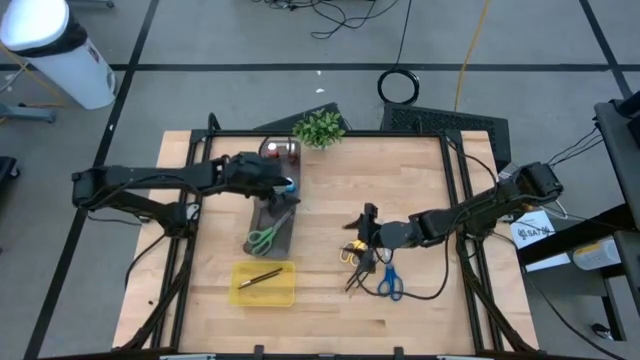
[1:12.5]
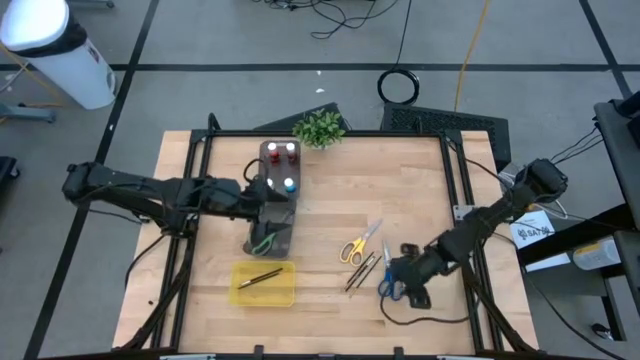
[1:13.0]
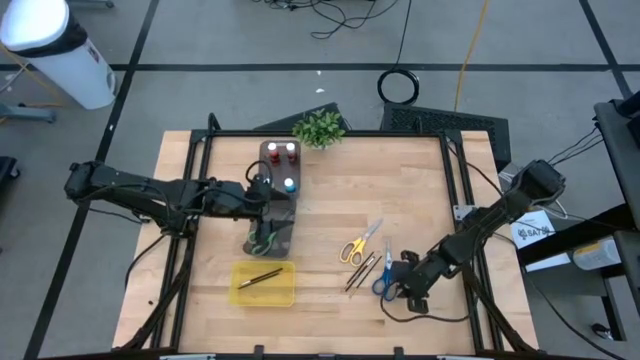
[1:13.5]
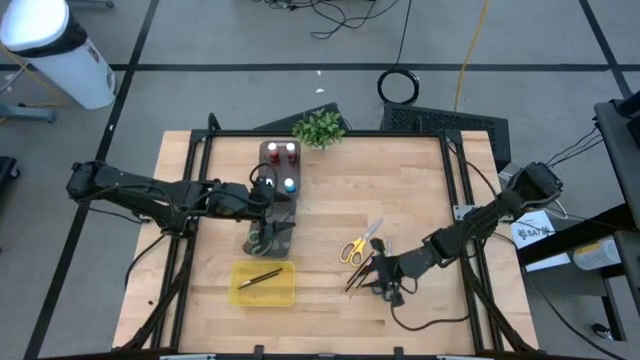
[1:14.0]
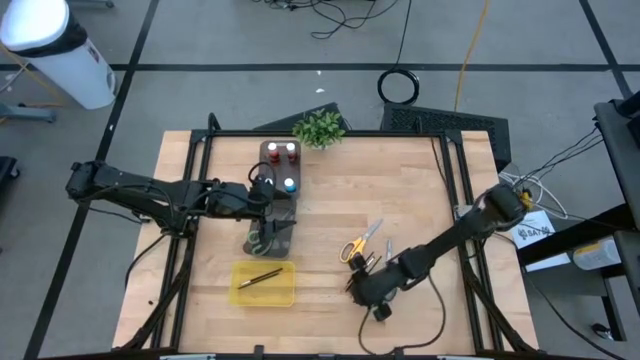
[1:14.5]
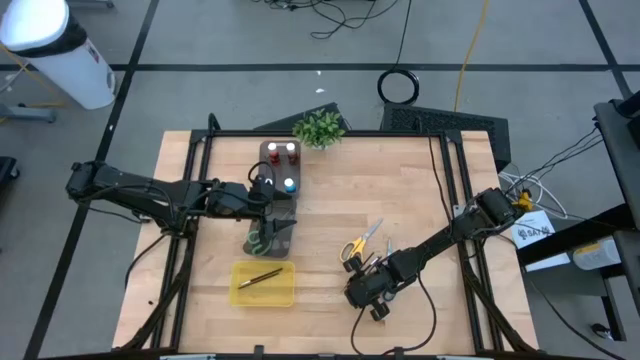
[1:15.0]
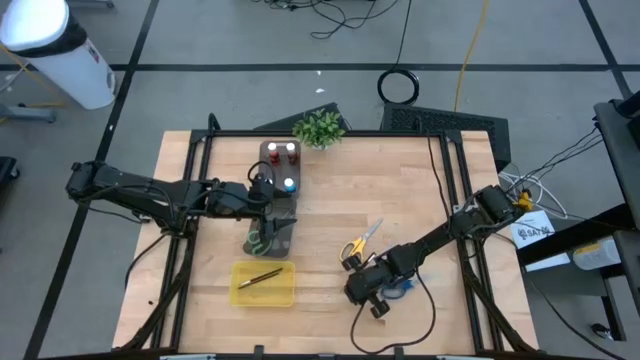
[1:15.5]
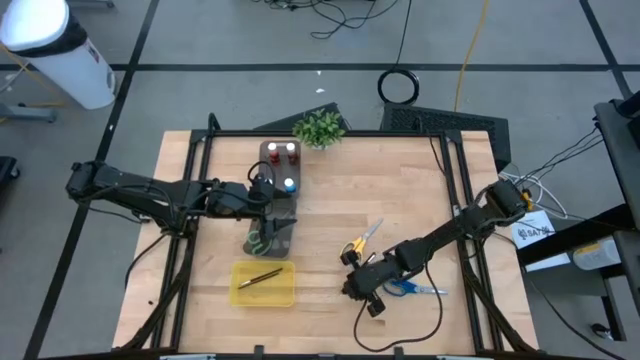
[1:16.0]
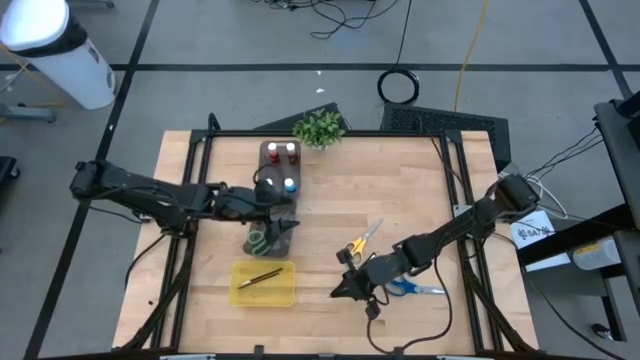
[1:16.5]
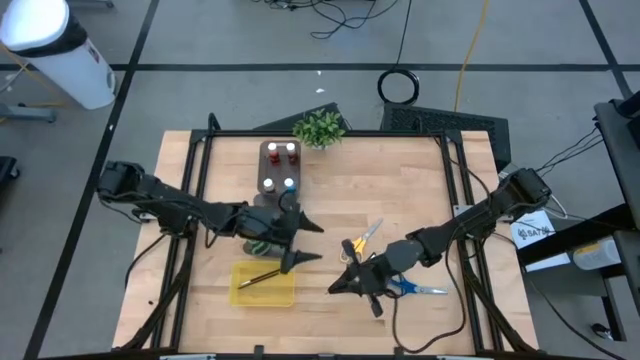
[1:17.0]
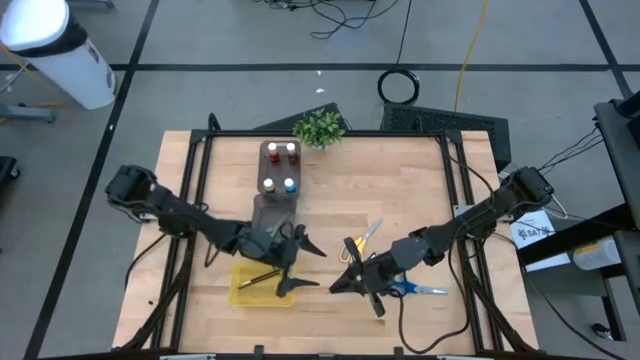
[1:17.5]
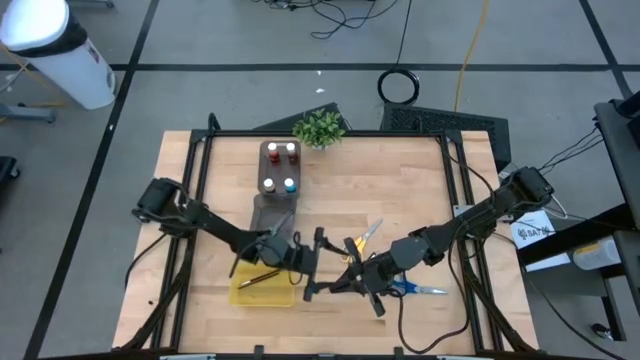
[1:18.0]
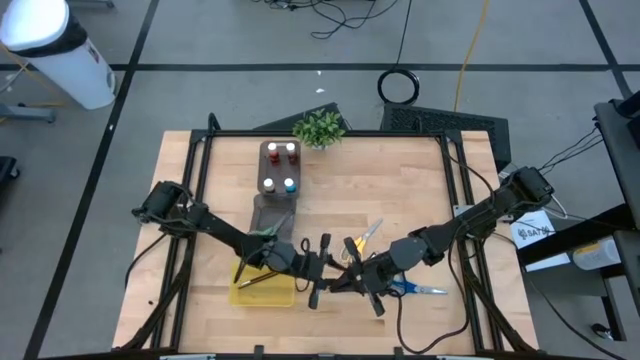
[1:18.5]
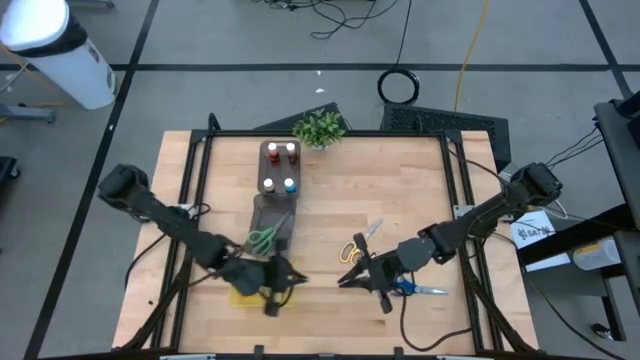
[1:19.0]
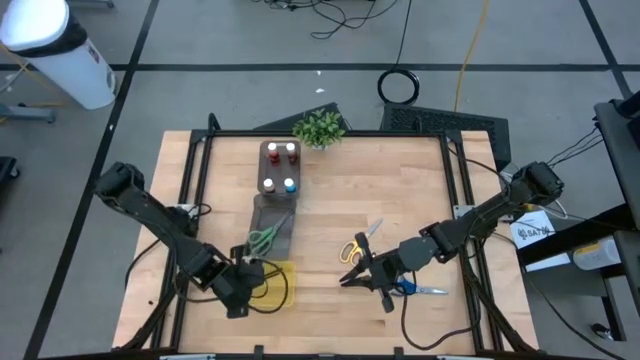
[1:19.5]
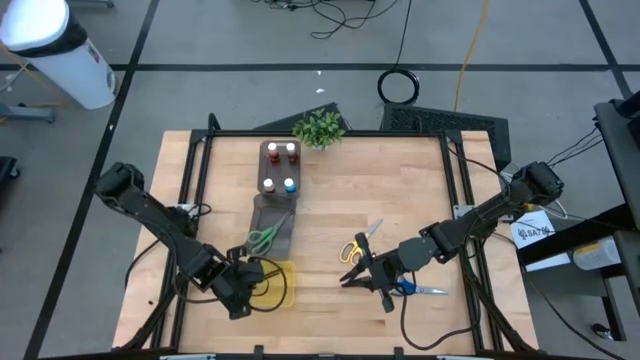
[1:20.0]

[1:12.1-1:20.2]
Task: Pick & Place Paint Supplies
Put the gold paint brush into the yellow bin

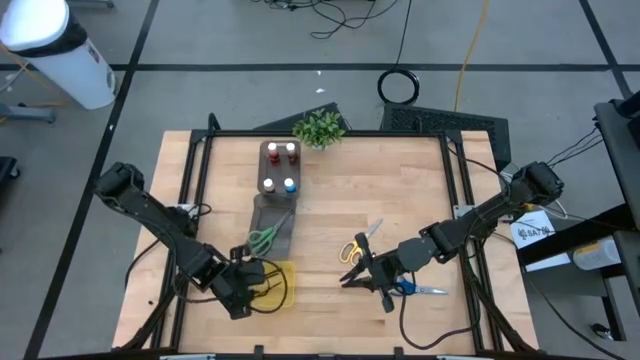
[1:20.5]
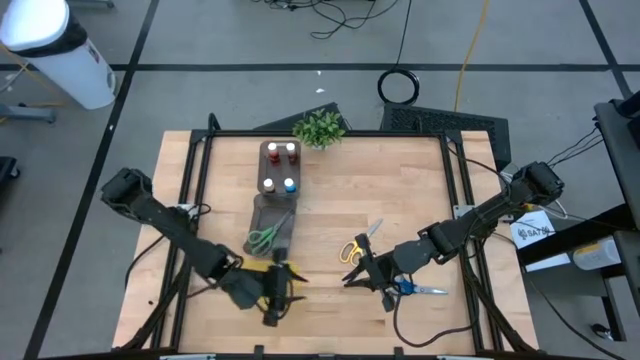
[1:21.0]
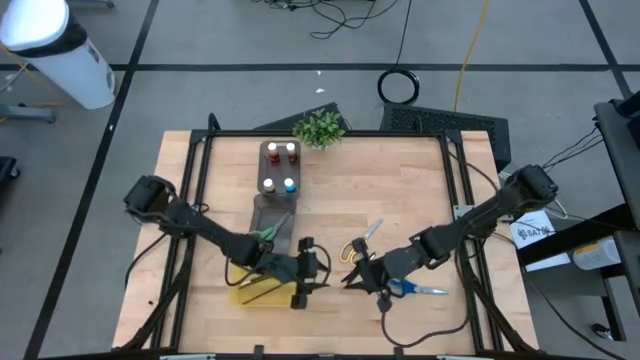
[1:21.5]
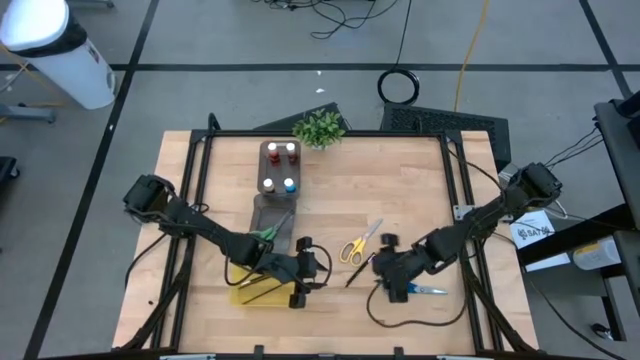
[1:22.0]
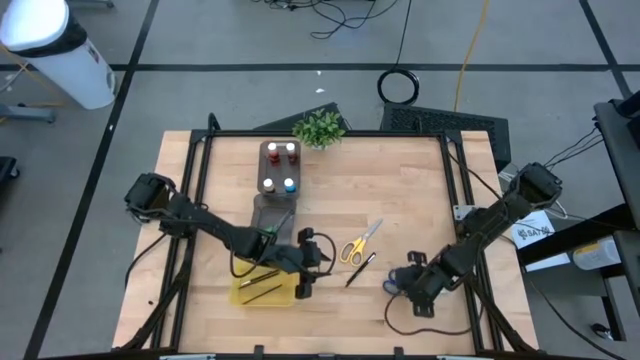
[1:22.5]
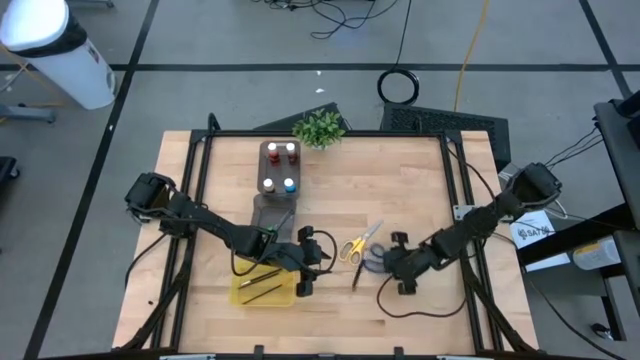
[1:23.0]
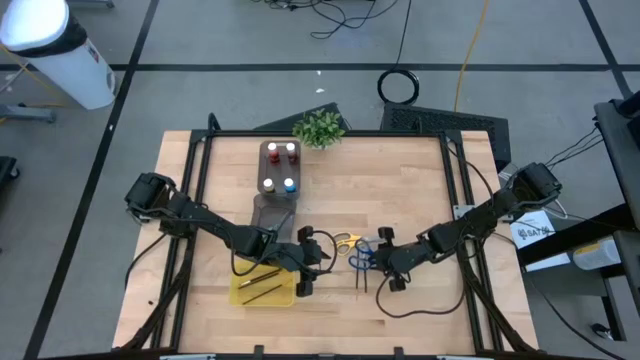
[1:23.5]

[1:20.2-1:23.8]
Put the blue scissors into the bottom black bin

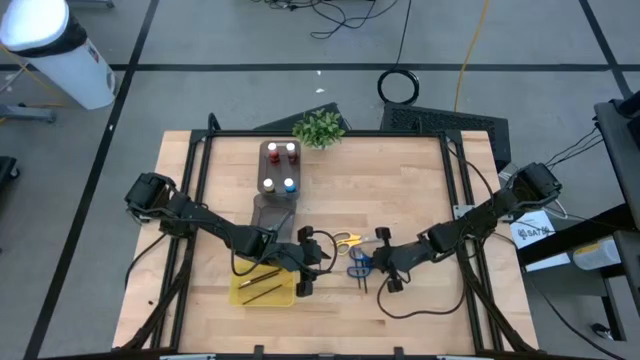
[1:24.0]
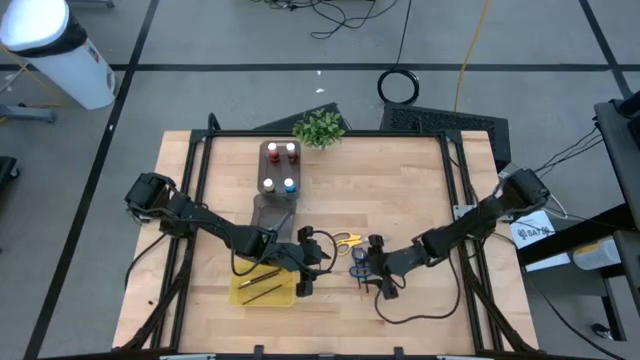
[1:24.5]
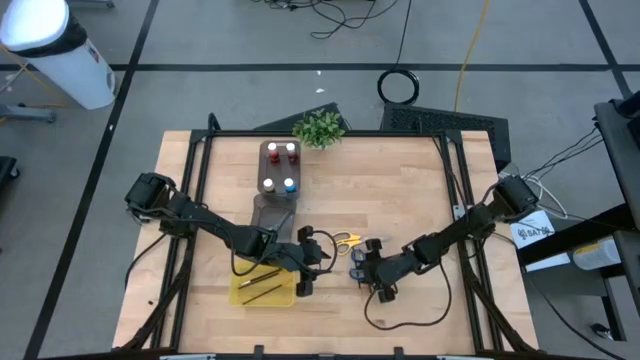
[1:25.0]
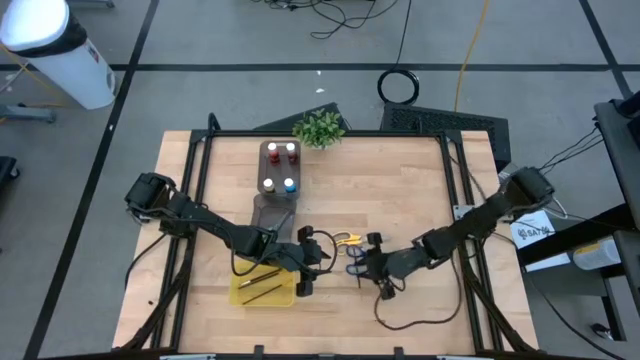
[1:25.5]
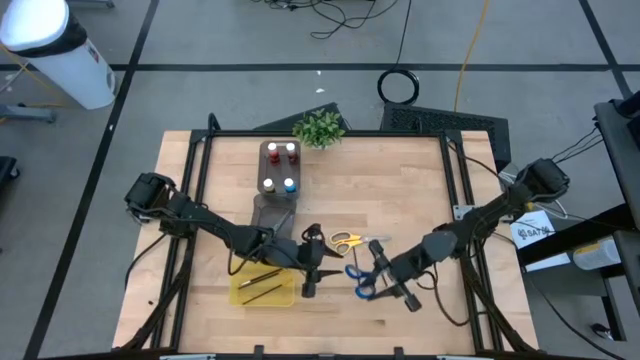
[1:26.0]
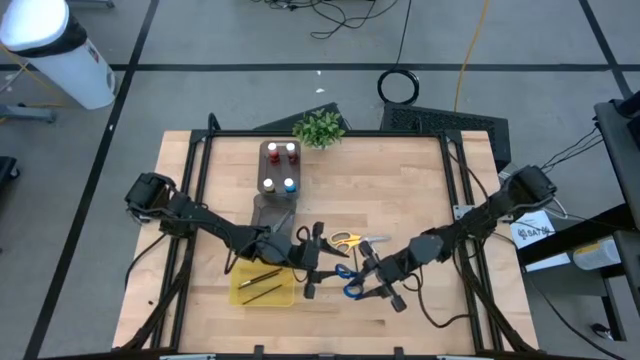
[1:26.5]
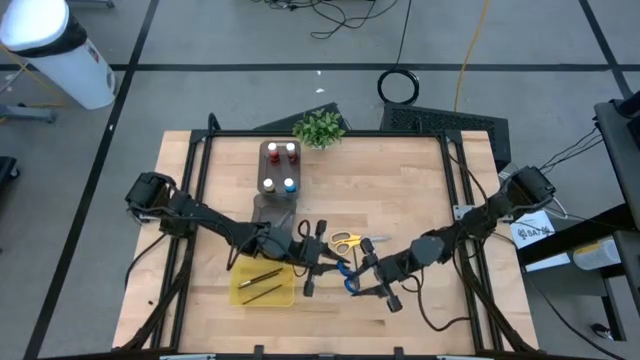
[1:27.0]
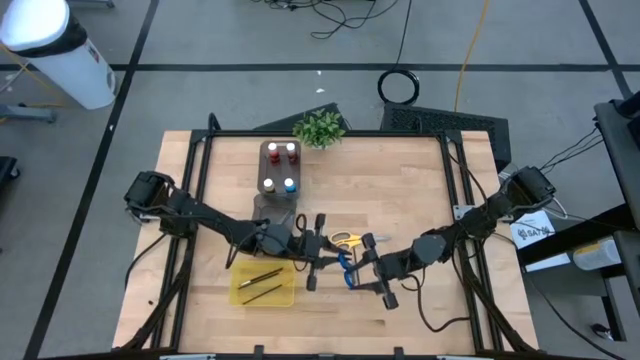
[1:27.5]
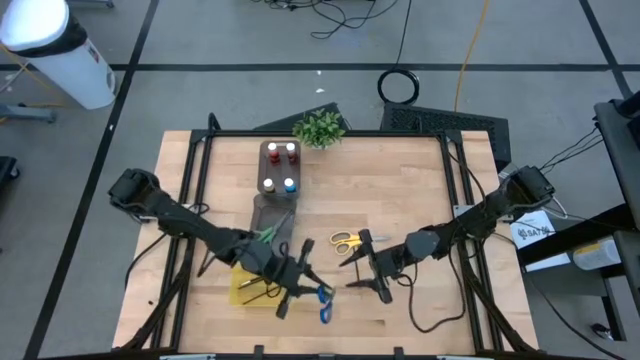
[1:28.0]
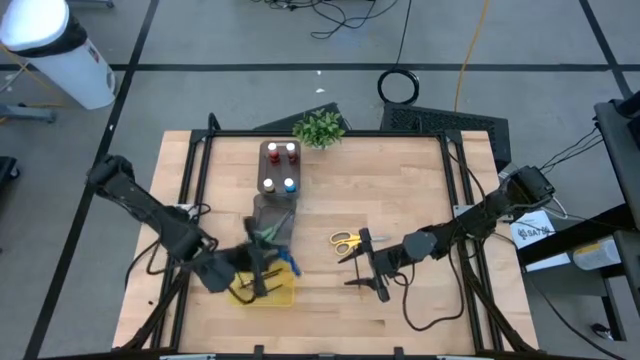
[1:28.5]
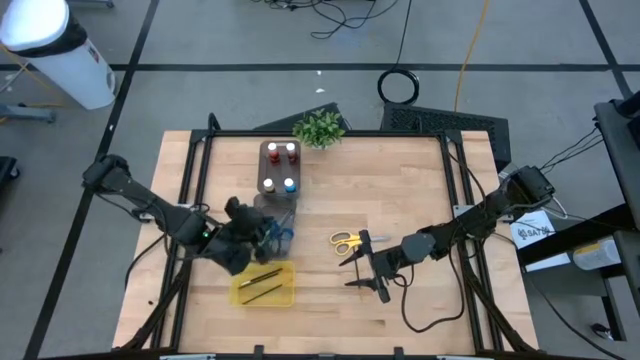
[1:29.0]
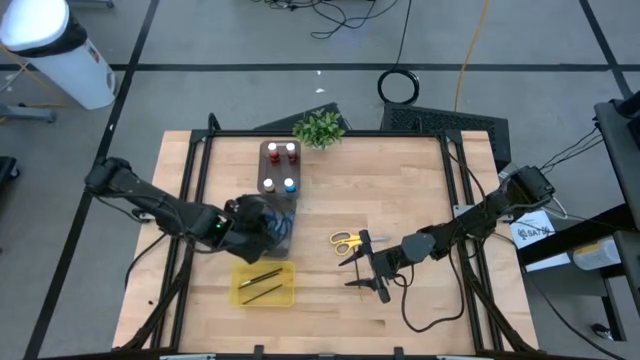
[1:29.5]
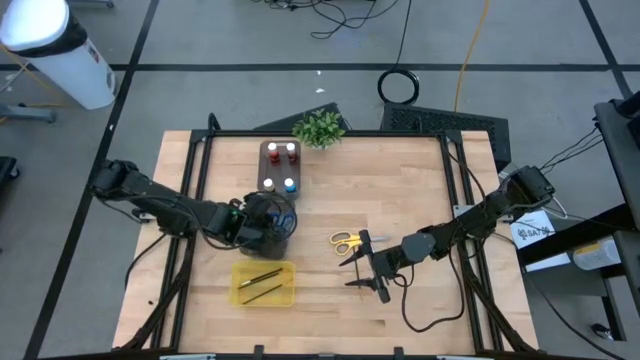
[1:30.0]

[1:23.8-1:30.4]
Put the blue scissors into the bottom black bin

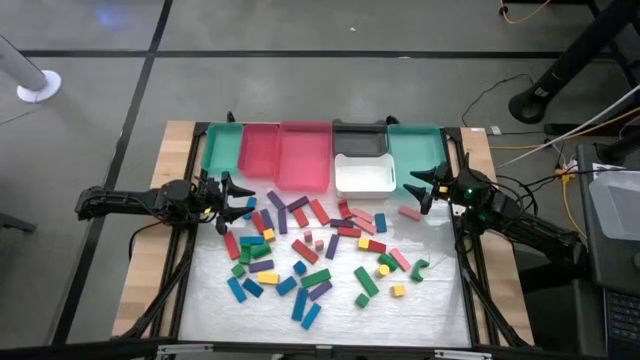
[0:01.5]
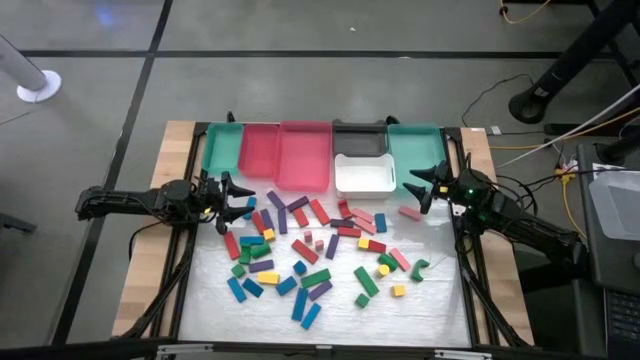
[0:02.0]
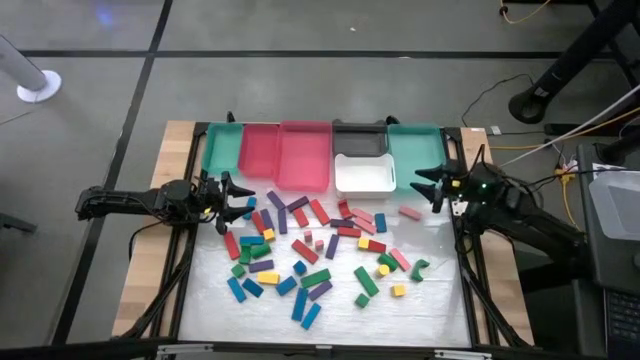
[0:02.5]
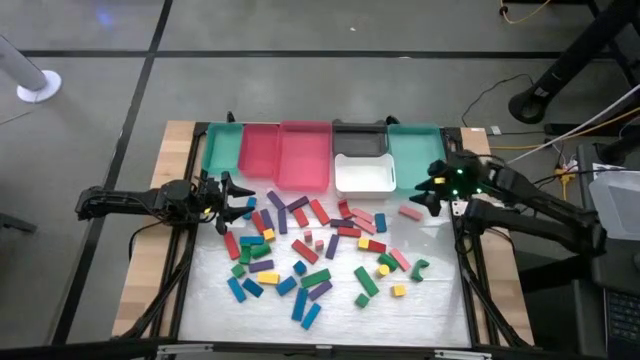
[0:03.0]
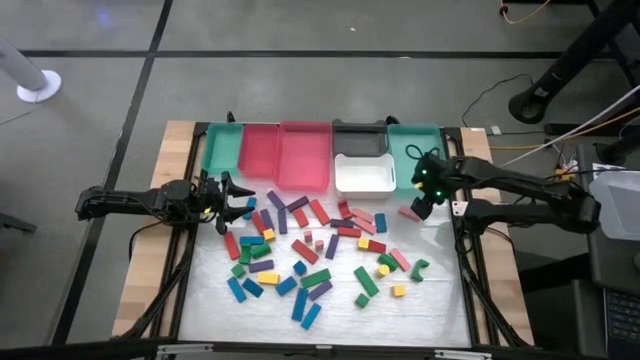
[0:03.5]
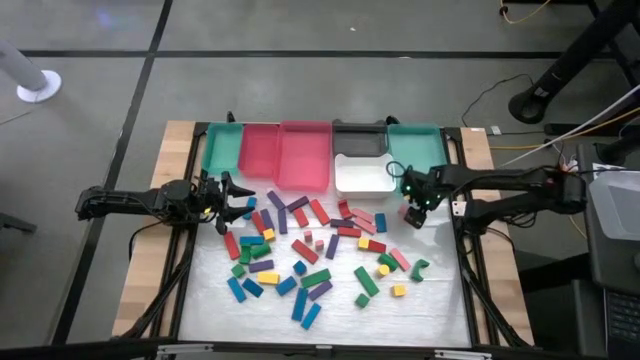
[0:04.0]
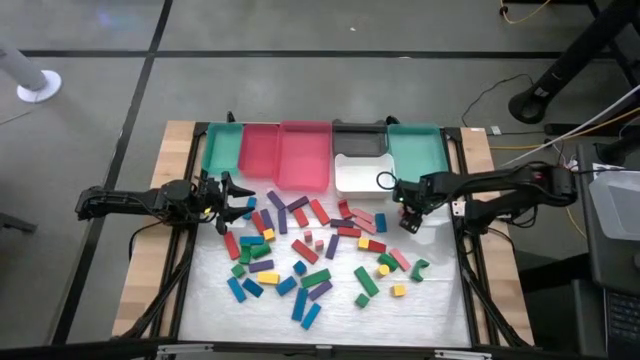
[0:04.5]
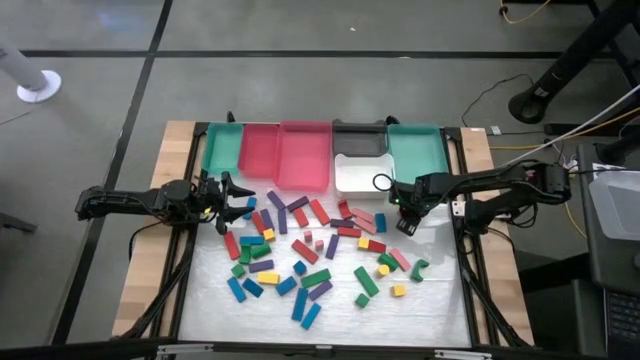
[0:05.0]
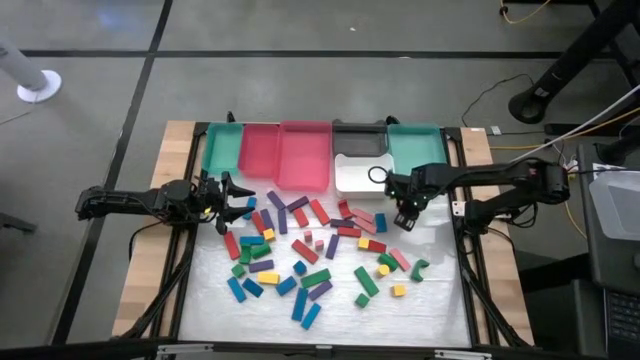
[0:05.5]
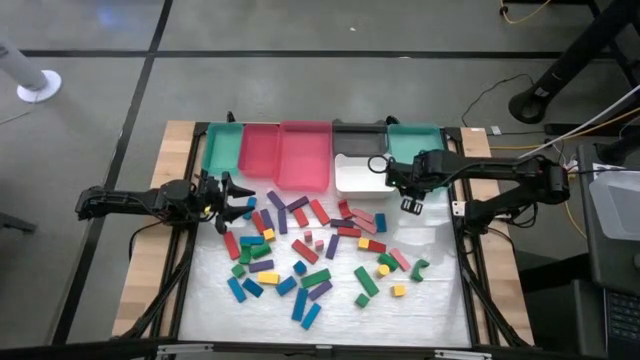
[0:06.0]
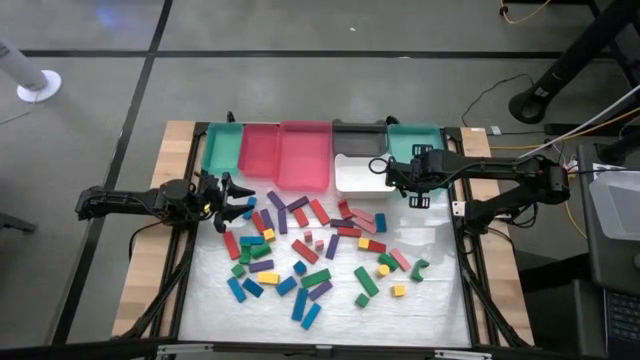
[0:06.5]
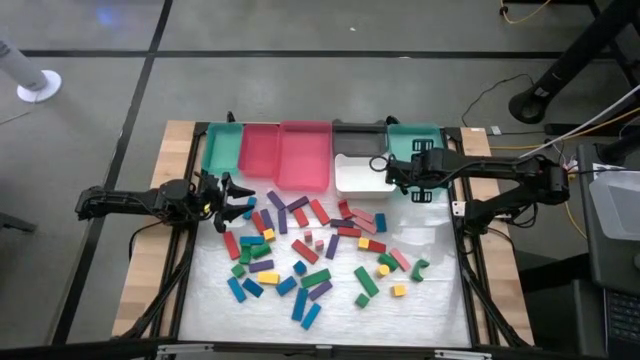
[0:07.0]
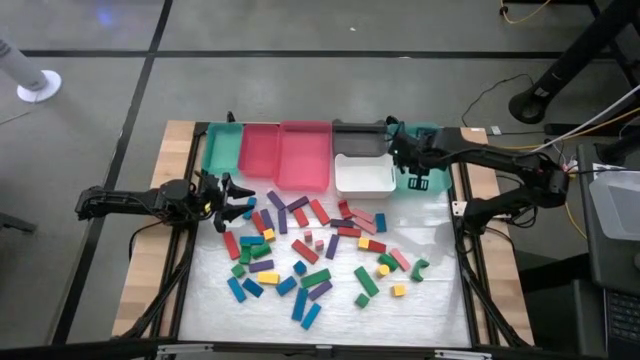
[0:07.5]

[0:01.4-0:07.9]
Task: Sort blocks
Put the pink block into the right green bin
